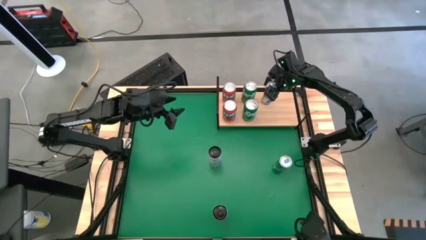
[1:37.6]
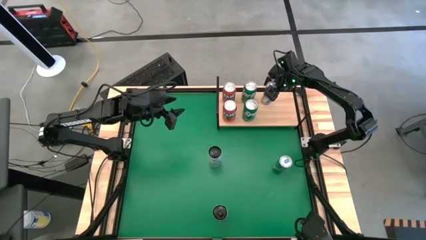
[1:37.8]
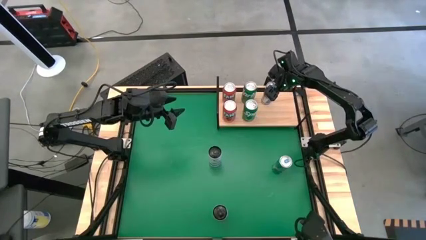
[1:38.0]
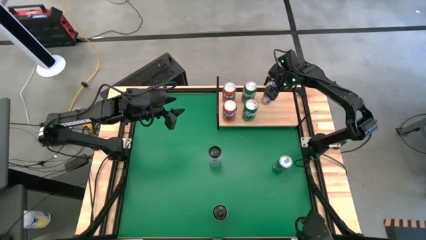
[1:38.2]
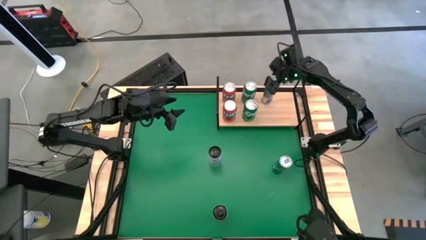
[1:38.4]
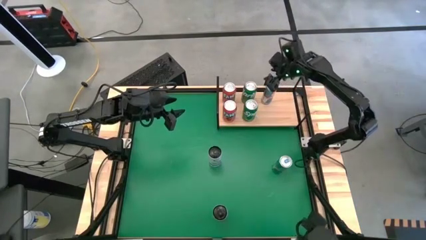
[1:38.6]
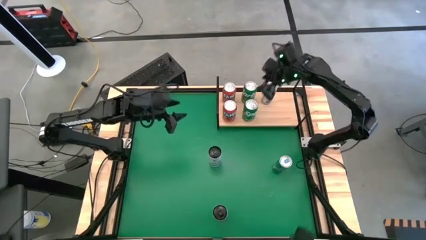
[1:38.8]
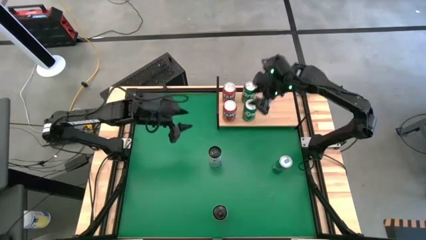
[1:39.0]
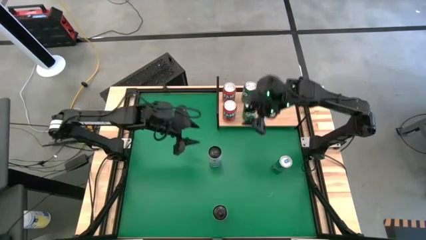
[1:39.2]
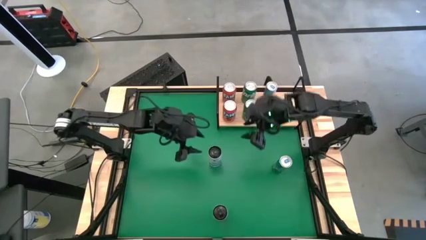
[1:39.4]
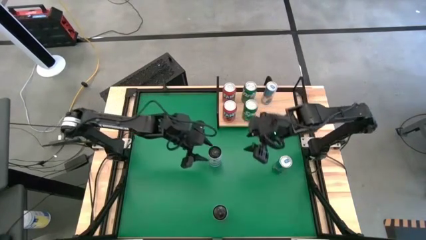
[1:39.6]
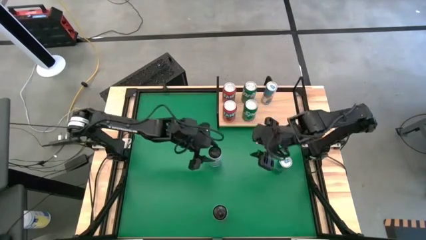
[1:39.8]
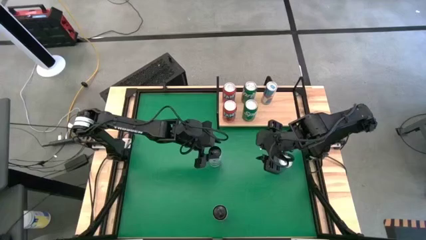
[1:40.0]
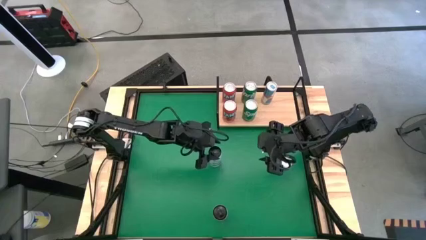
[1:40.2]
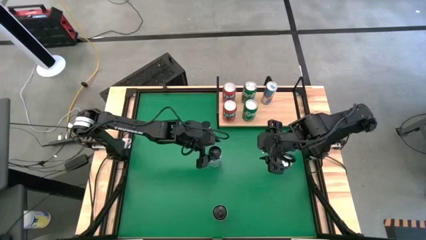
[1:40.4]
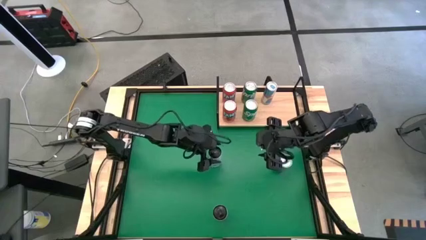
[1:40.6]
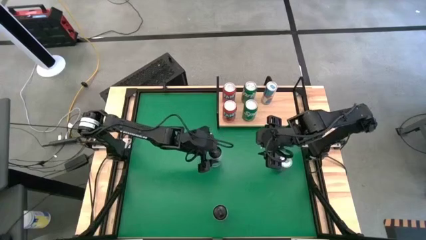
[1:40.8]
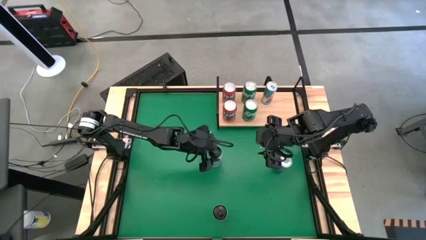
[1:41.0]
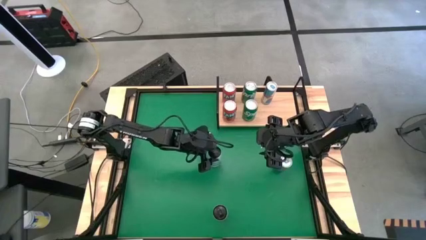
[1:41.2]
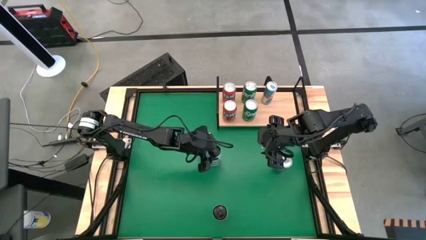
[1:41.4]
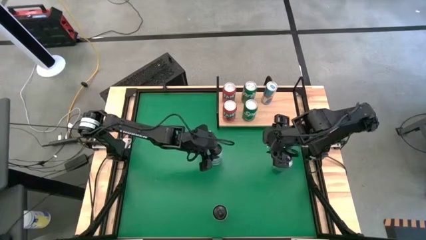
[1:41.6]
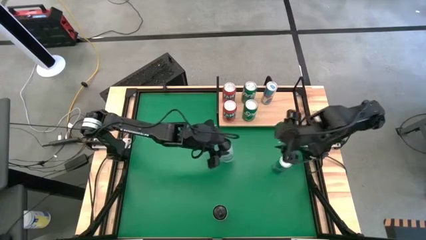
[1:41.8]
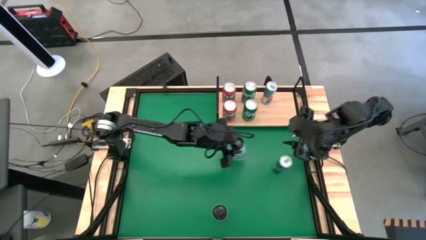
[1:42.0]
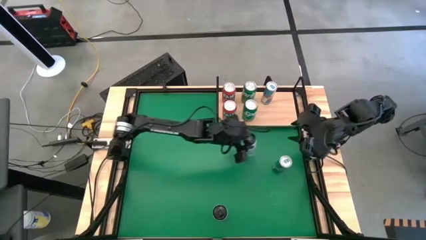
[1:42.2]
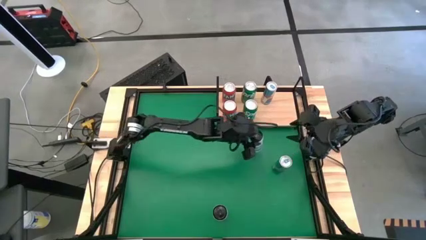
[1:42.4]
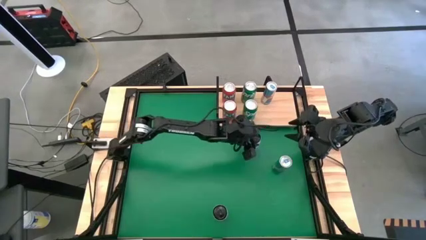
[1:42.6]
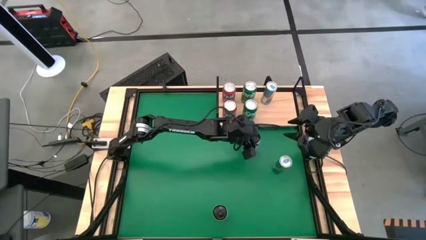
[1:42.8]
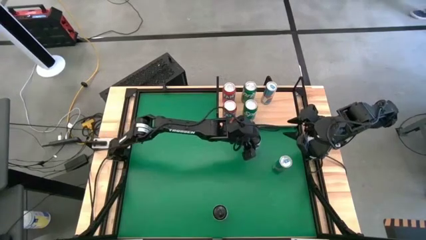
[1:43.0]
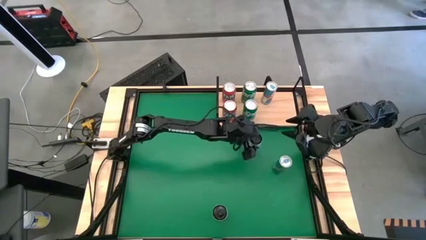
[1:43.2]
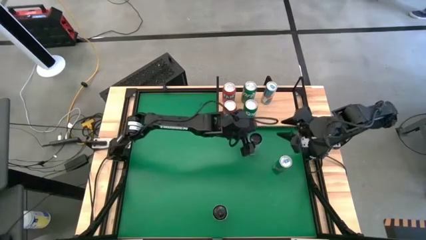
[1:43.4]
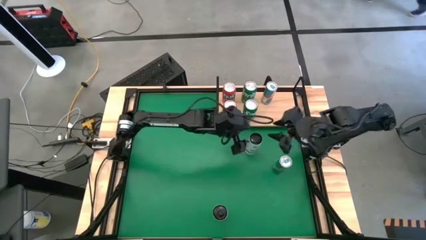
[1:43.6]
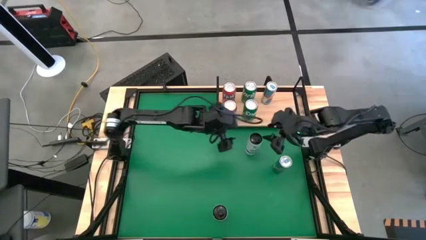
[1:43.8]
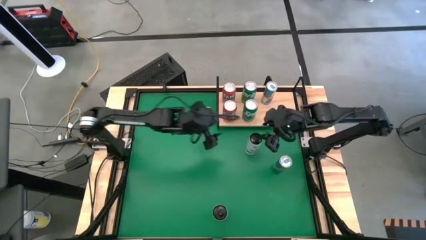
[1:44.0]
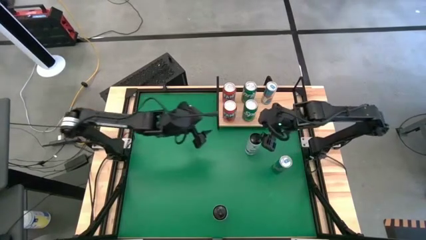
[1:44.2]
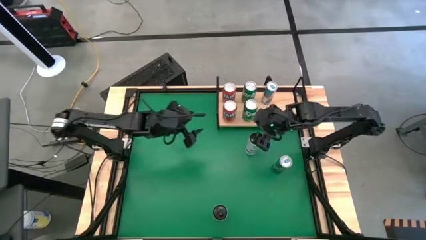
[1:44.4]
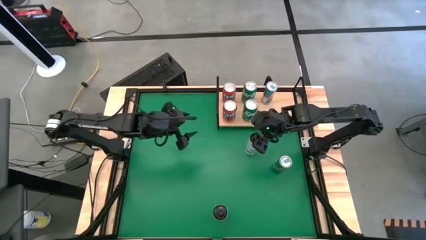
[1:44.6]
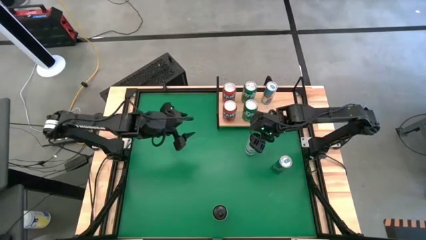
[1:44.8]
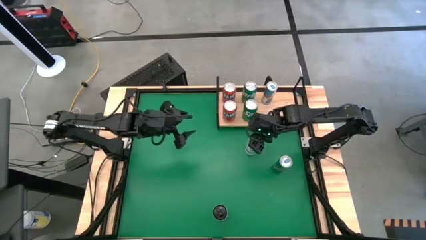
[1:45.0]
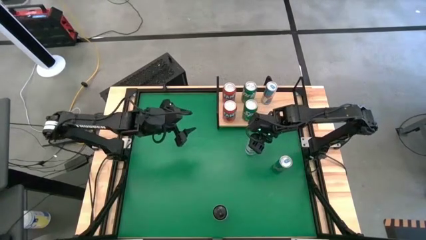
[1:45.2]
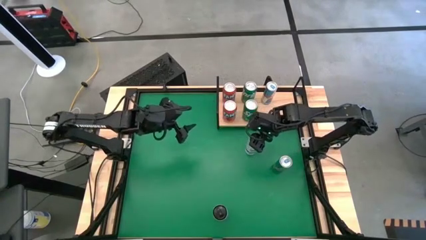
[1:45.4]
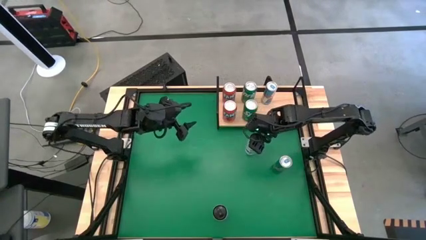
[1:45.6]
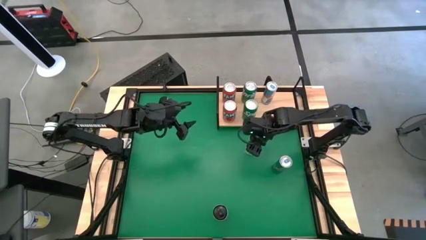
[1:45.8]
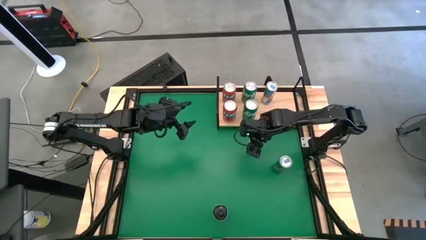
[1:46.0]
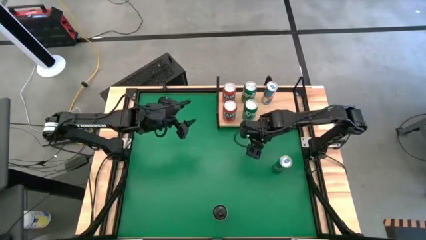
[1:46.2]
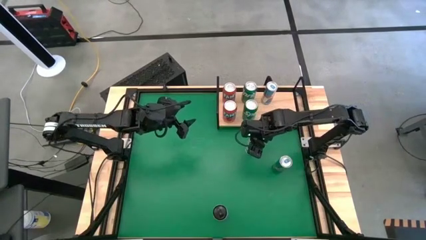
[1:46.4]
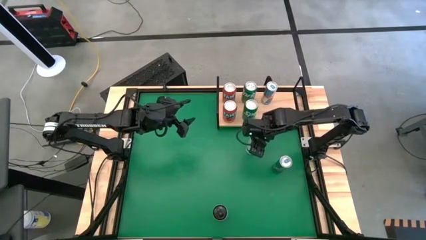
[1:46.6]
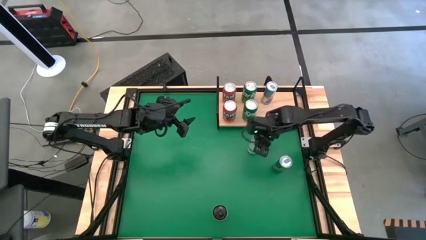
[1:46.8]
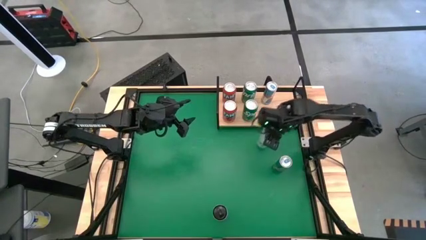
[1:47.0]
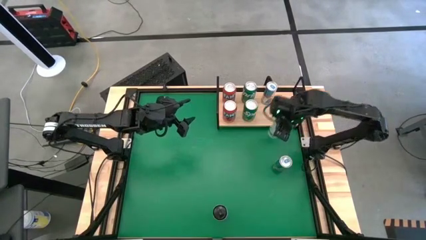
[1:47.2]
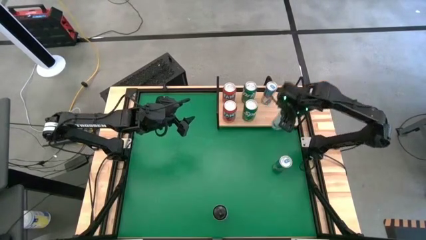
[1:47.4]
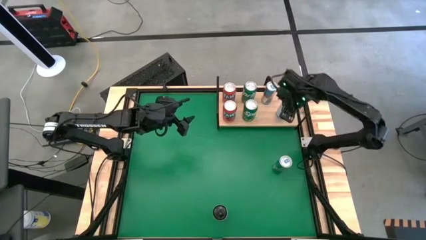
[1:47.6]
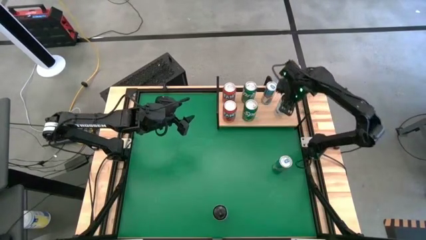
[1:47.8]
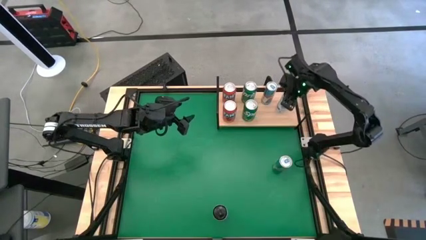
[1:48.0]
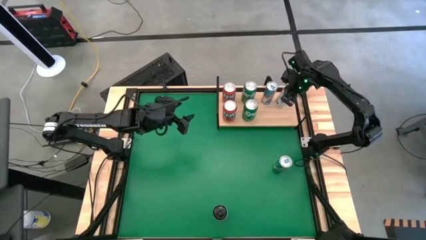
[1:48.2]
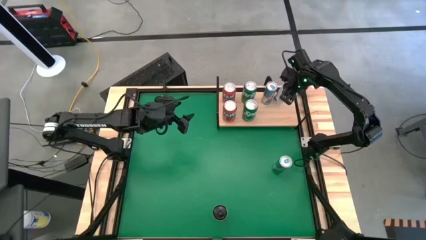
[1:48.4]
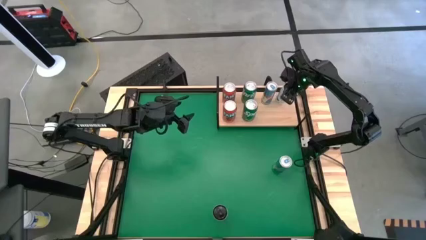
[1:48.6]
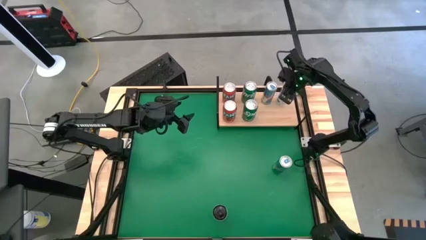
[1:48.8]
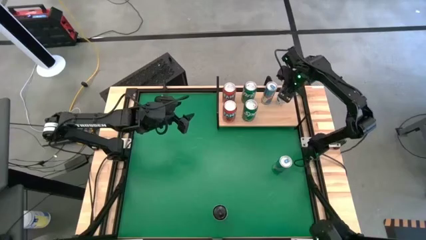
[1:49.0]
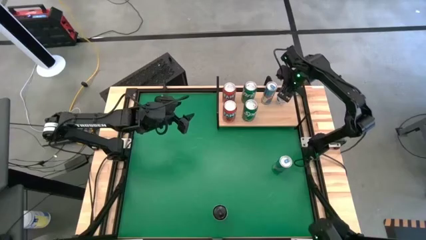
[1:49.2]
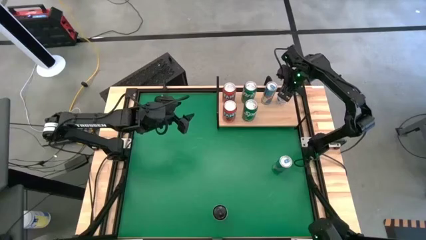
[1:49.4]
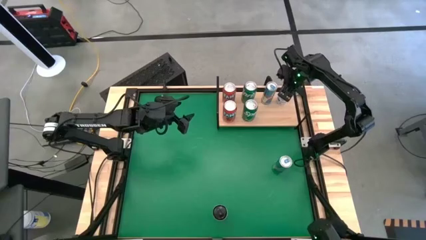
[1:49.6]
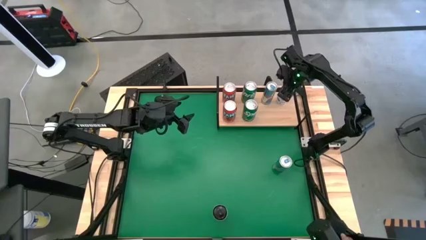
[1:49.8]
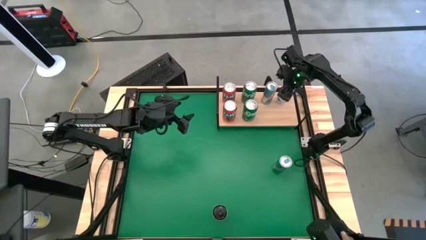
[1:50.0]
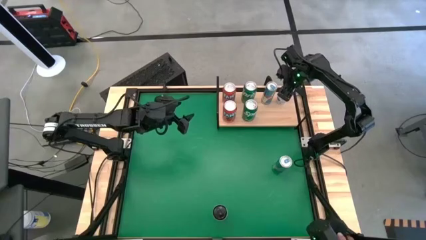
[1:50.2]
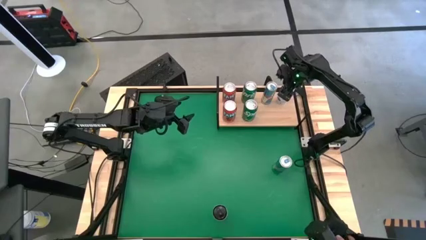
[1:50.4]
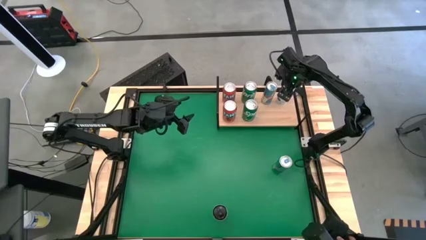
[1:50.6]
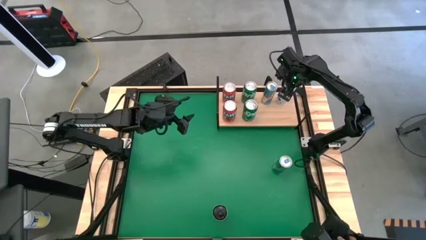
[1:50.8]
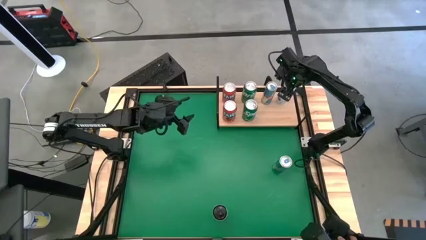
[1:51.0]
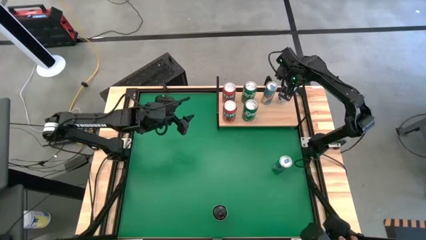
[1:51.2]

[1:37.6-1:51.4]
Task: Place canned beverage on shelf
Put the top white soda can on the shelf

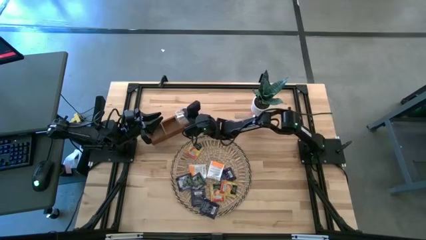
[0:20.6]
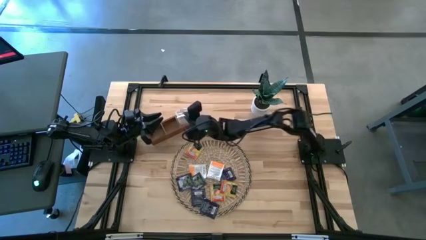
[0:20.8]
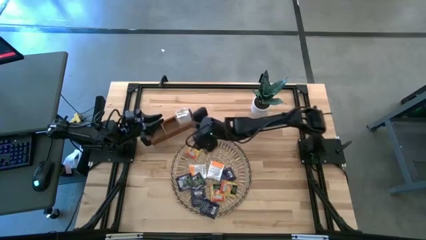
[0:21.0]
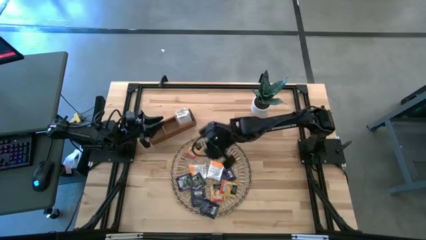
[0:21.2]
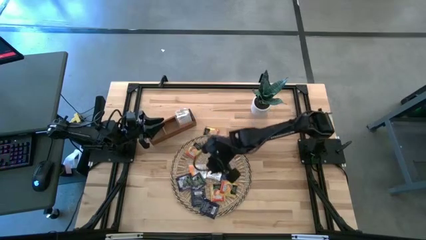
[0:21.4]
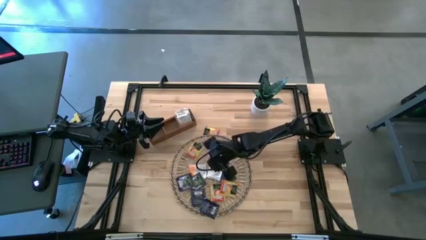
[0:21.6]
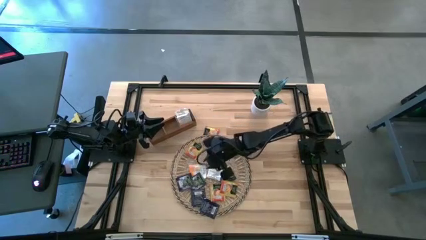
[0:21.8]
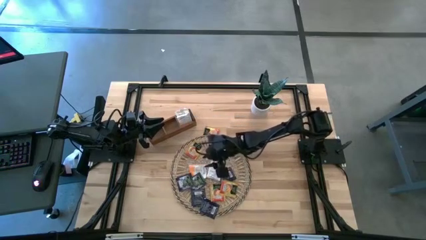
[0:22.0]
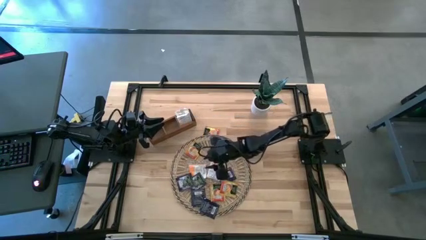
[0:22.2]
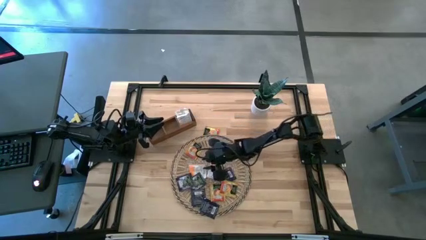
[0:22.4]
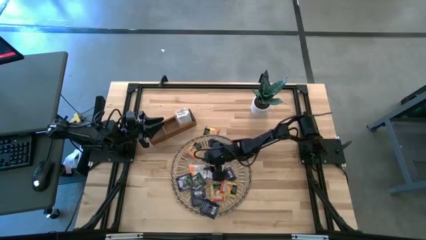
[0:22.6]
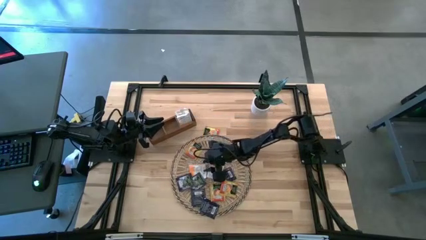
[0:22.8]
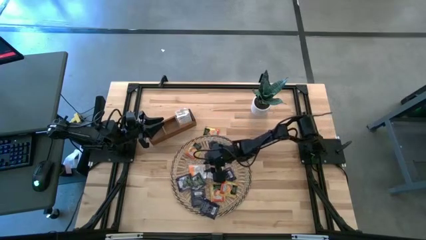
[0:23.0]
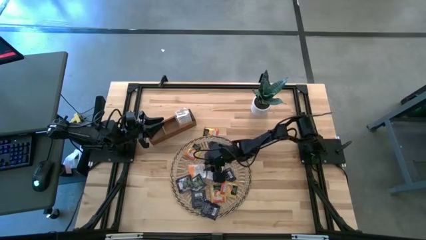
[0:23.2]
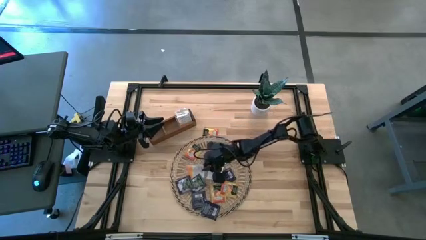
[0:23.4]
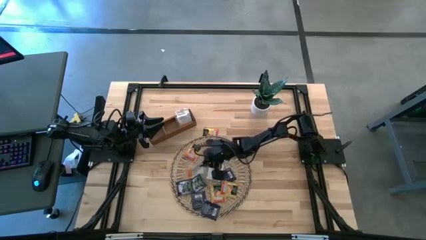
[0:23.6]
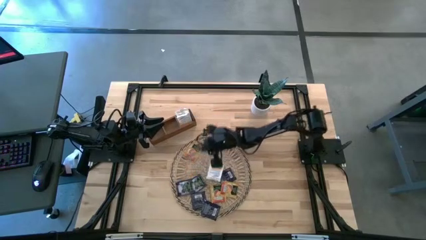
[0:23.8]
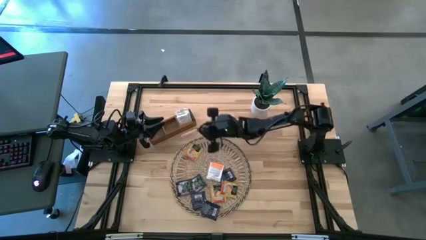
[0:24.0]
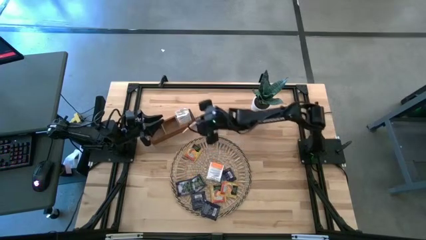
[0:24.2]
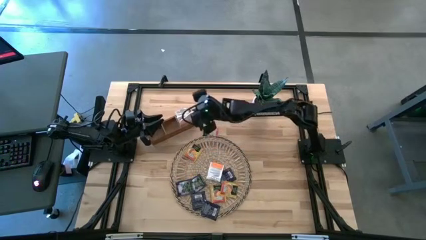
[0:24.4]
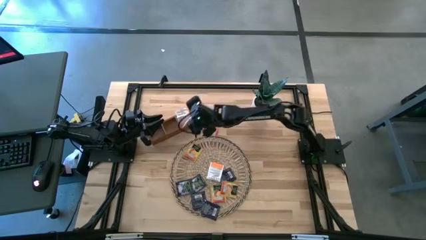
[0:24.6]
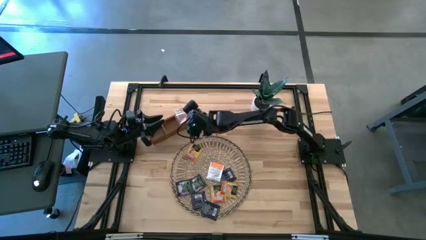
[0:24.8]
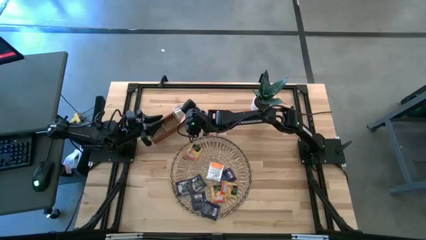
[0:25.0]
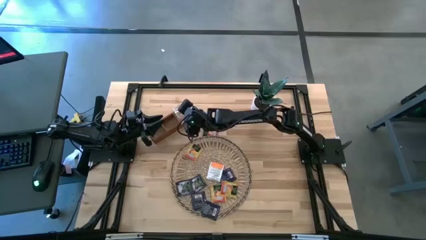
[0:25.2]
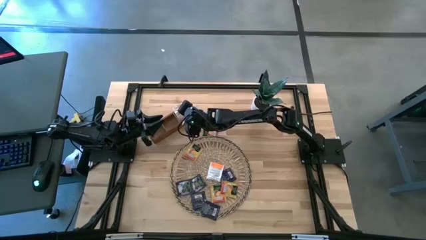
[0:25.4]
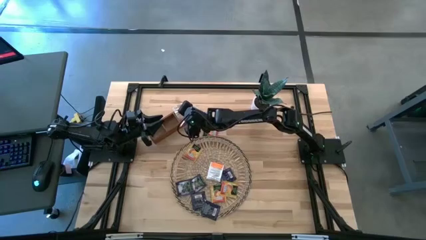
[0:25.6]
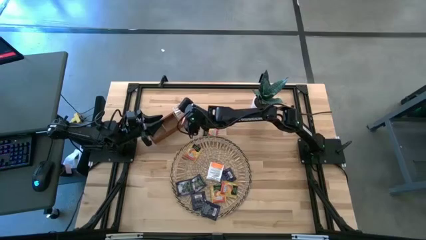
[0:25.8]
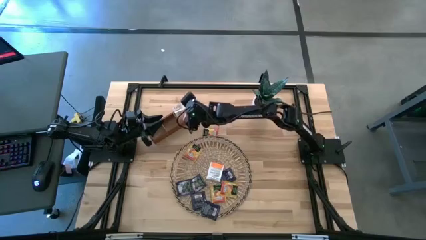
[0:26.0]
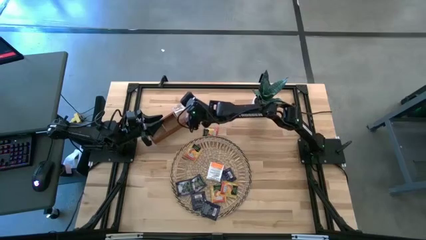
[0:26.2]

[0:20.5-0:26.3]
Task: Pick & Place Tea
Put the left white tea bag into the right compartment of the wooden organizer
